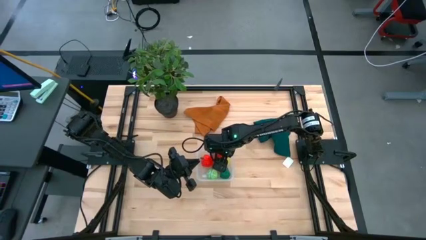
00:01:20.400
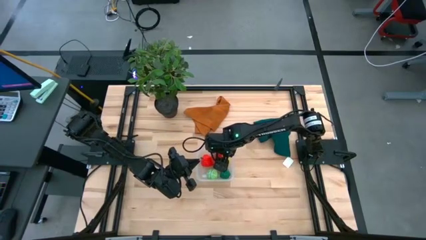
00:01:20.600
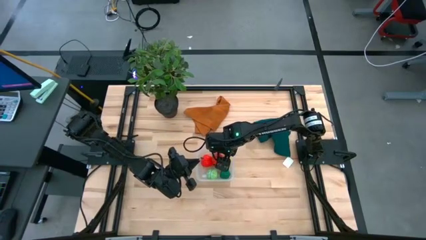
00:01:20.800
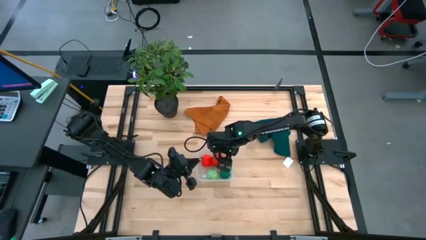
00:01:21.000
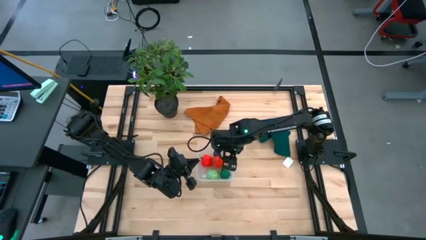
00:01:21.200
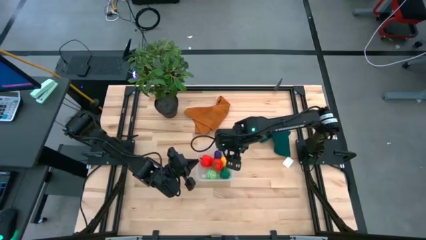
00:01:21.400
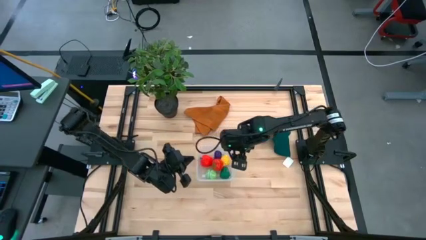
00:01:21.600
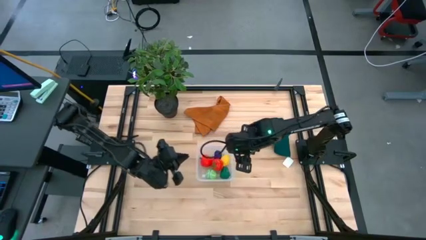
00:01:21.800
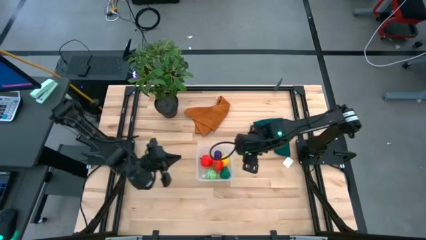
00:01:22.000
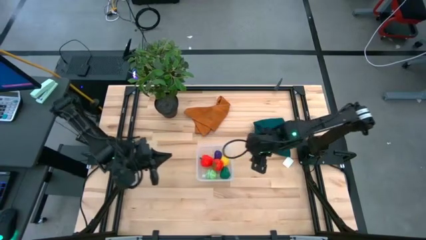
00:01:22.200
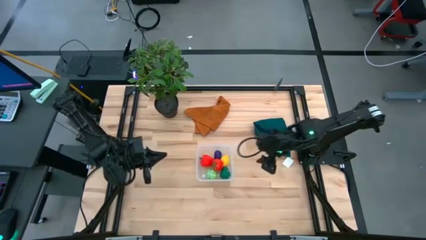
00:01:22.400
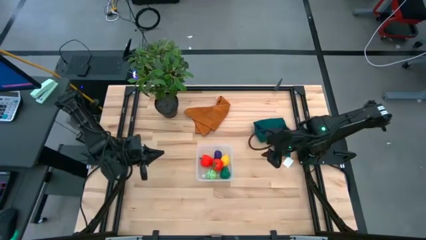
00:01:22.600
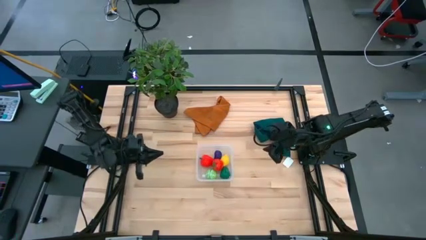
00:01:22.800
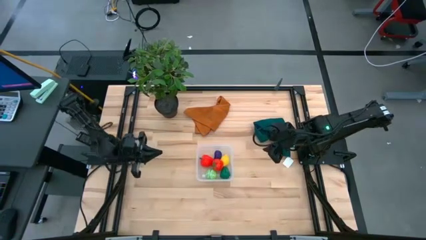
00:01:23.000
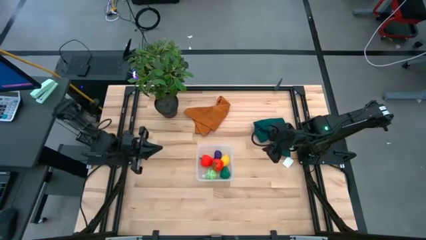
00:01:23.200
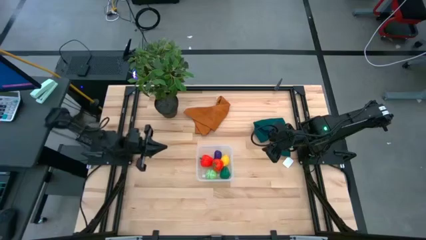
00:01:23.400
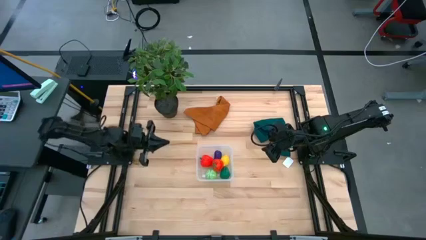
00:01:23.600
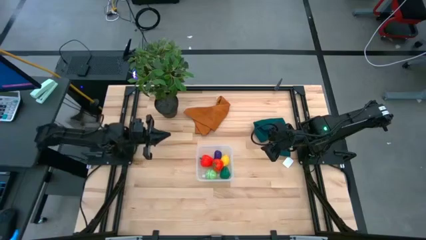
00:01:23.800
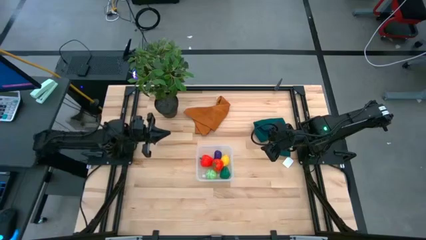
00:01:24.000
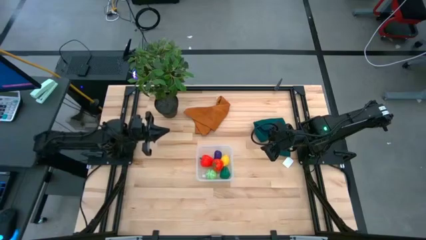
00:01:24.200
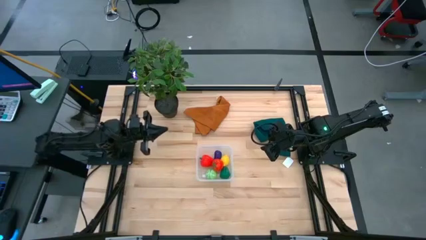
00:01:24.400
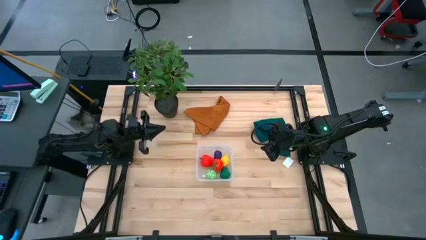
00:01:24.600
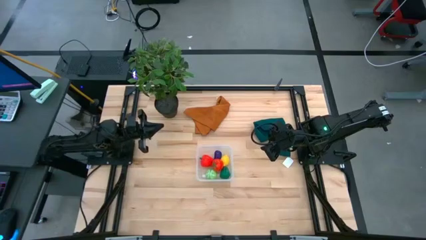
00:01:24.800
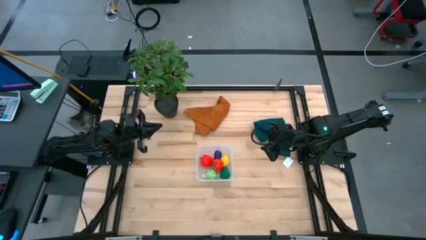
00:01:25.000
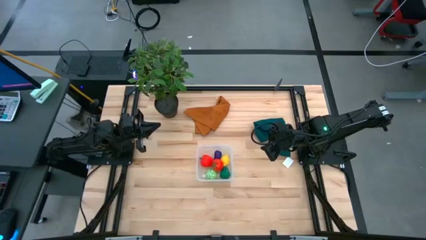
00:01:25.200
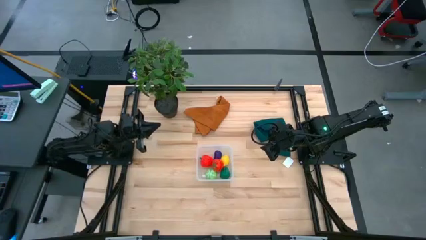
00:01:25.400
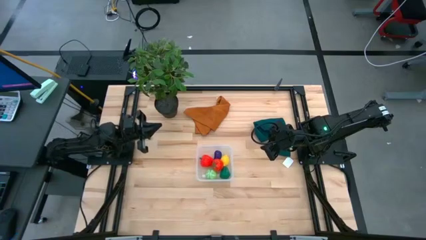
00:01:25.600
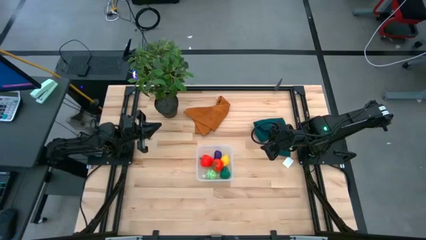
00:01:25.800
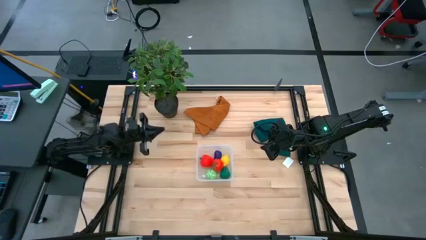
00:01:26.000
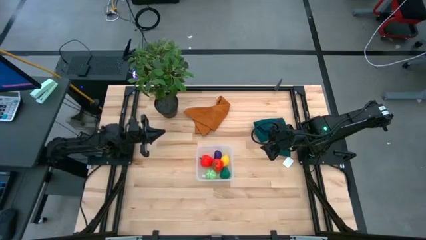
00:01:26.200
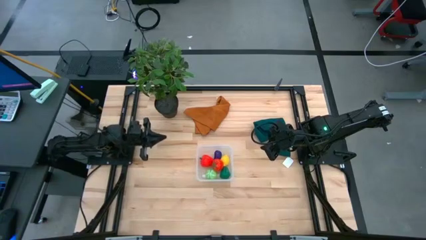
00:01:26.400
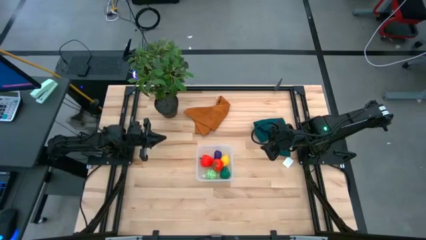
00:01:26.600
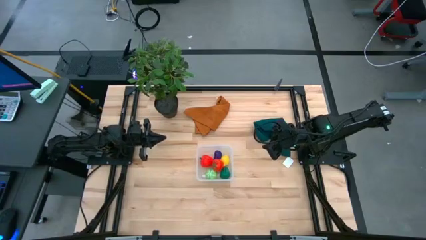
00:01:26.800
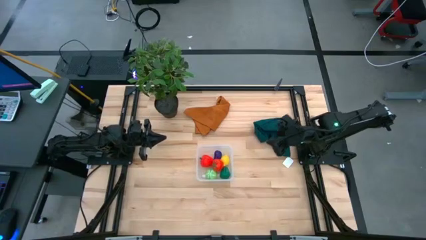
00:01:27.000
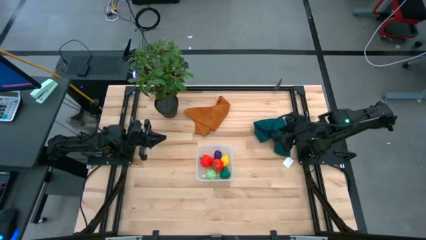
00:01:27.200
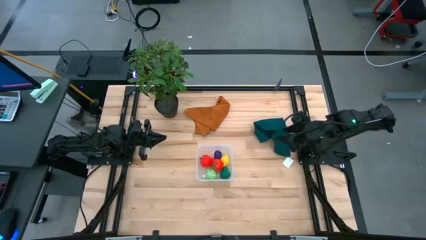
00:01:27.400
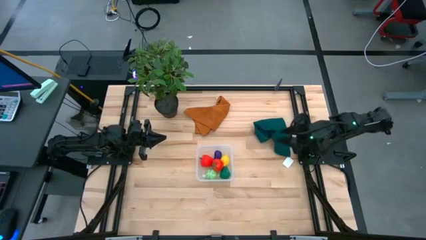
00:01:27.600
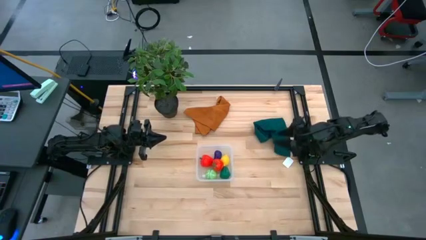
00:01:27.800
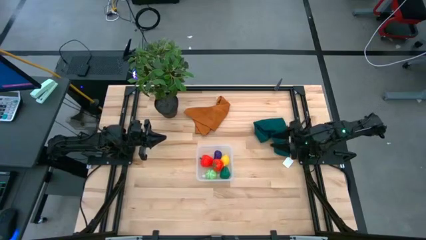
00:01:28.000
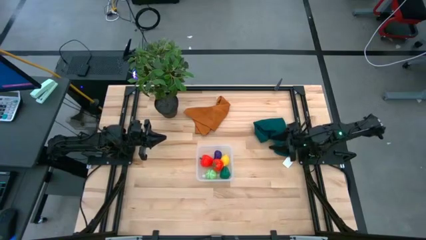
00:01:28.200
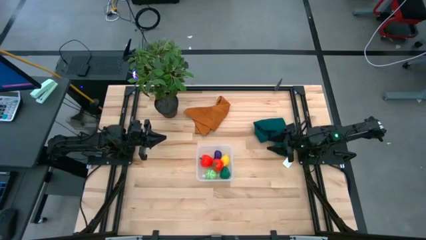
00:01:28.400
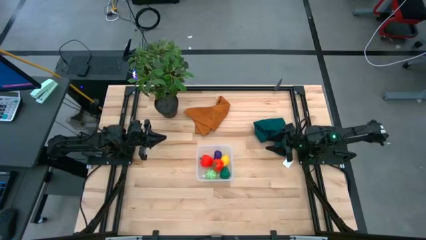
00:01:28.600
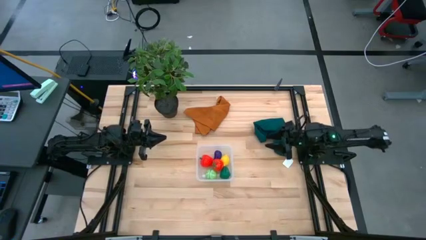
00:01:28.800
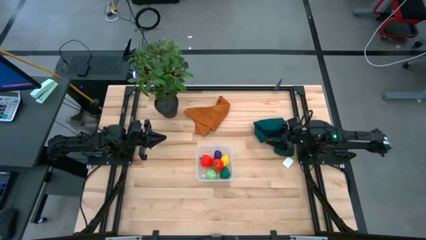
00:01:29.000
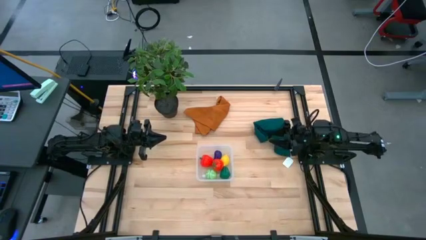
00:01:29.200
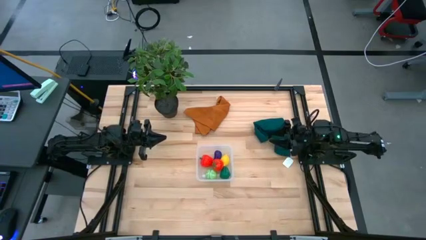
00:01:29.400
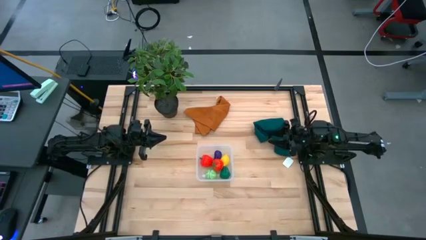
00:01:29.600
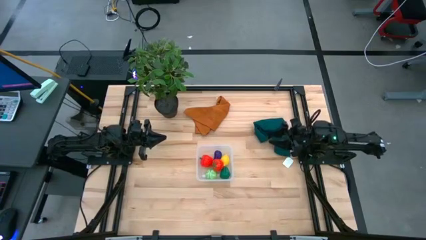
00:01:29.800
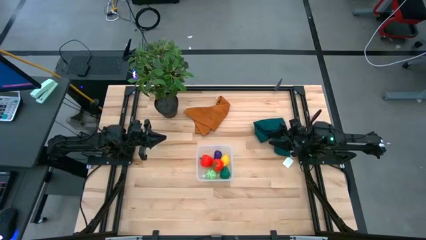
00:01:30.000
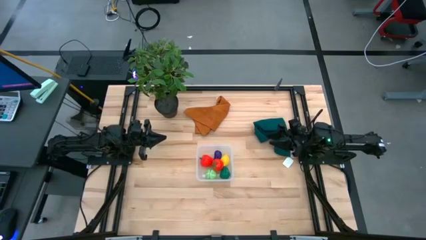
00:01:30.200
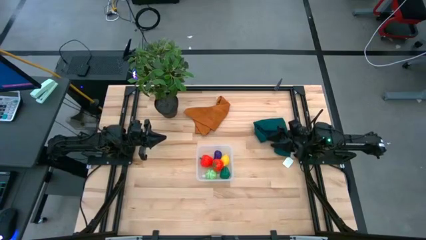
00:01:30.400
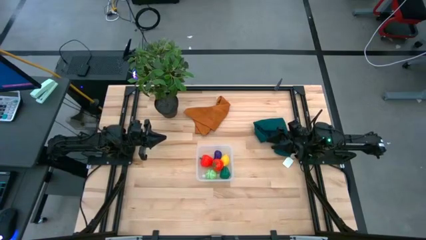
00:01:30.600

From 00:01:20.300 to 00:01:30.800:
Task: Pick and placing Produce into tupperware
Return to Home Position

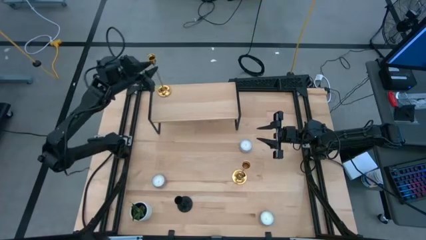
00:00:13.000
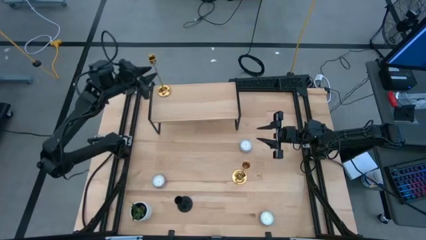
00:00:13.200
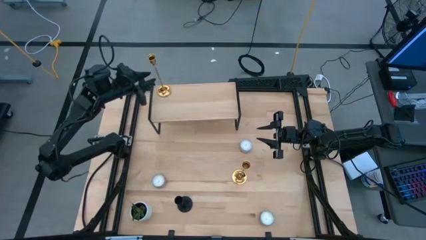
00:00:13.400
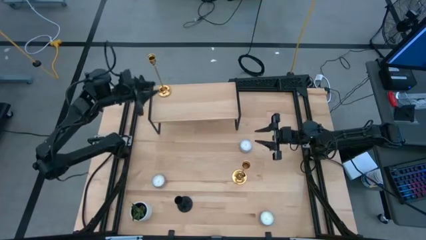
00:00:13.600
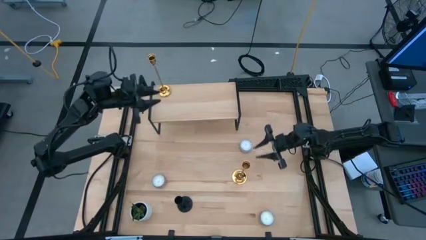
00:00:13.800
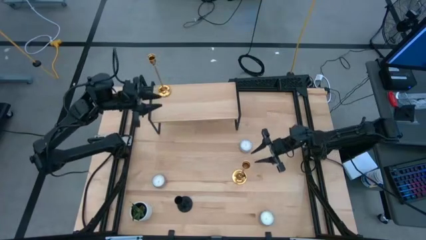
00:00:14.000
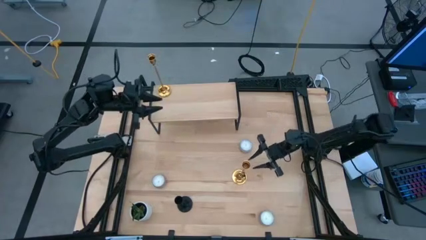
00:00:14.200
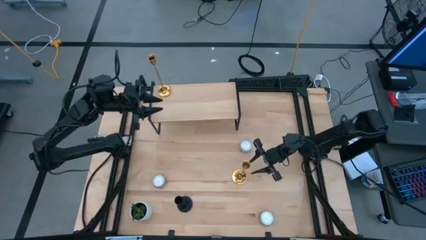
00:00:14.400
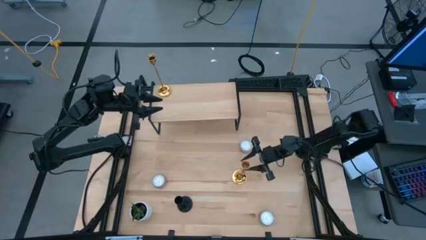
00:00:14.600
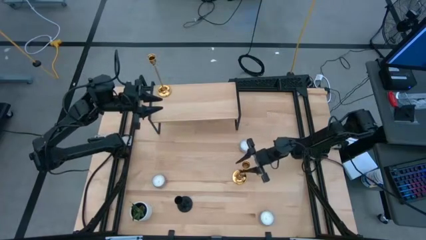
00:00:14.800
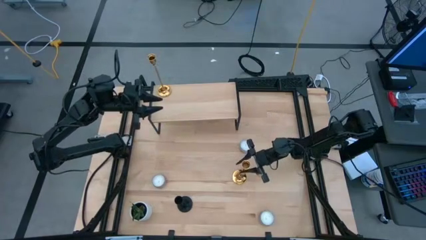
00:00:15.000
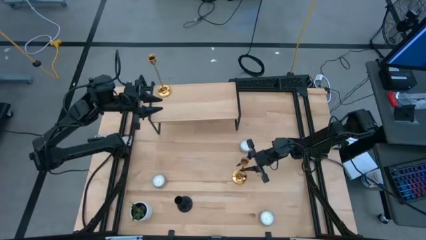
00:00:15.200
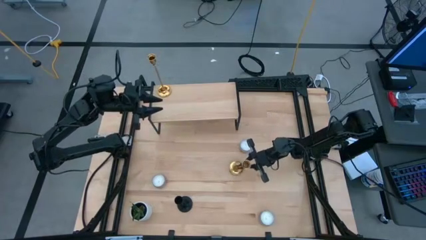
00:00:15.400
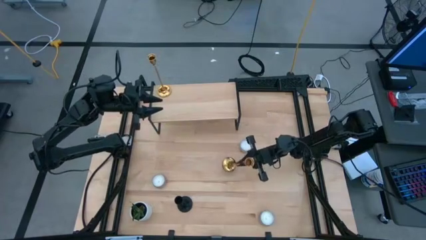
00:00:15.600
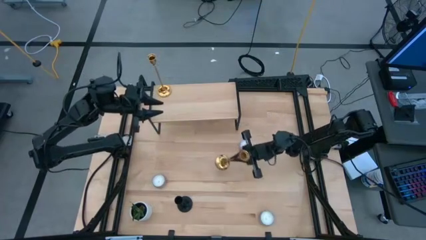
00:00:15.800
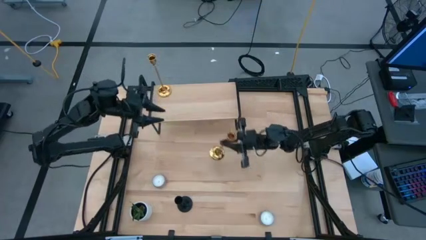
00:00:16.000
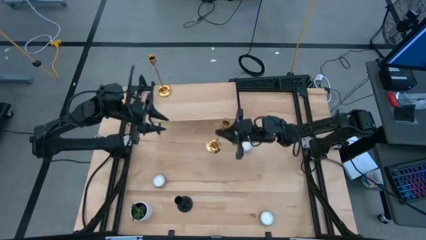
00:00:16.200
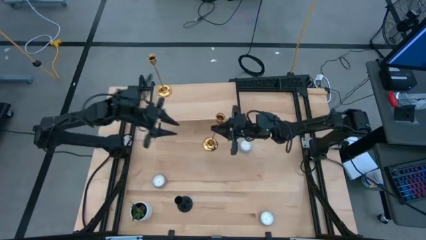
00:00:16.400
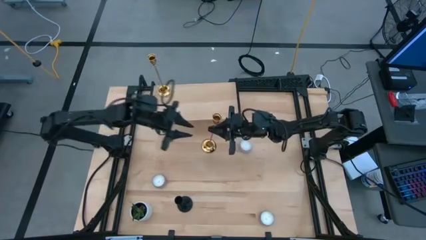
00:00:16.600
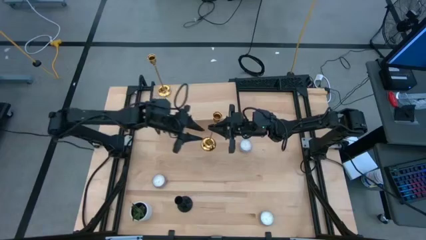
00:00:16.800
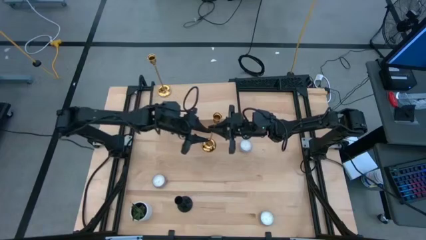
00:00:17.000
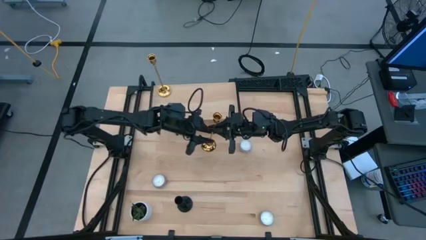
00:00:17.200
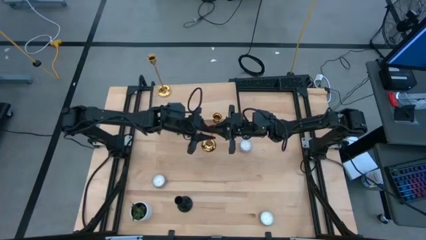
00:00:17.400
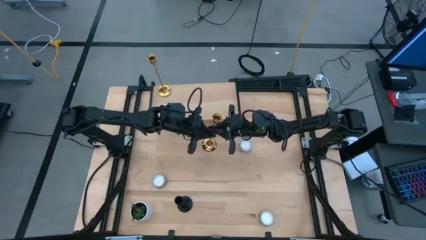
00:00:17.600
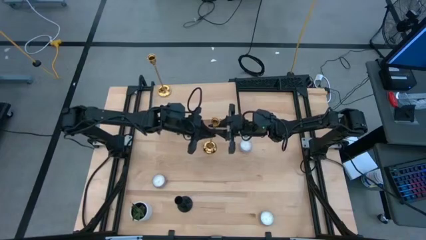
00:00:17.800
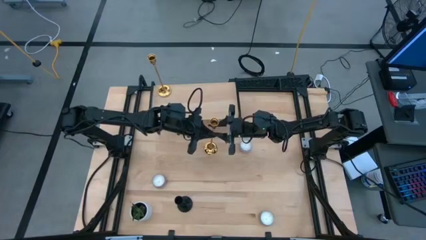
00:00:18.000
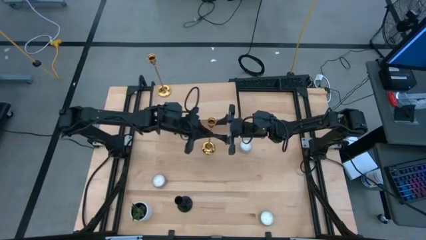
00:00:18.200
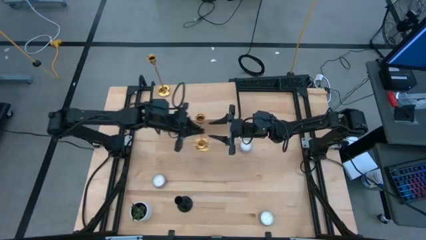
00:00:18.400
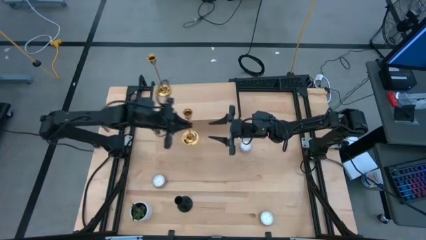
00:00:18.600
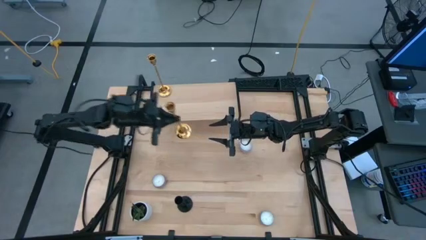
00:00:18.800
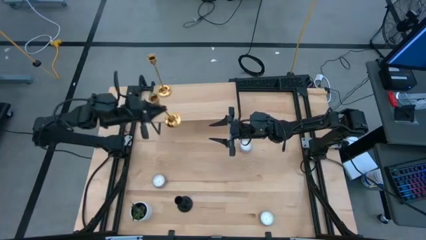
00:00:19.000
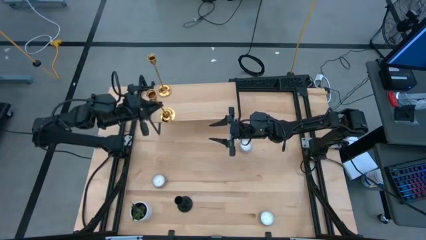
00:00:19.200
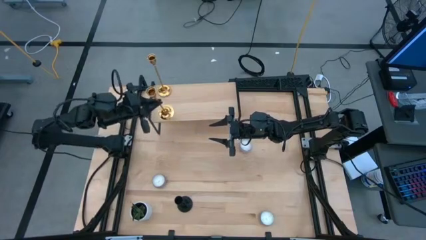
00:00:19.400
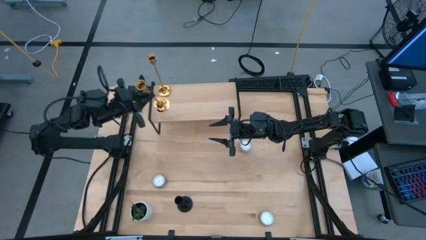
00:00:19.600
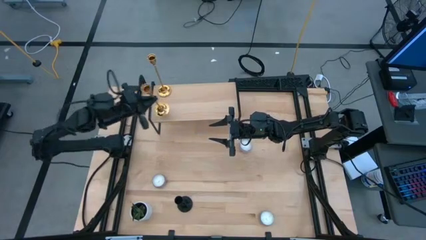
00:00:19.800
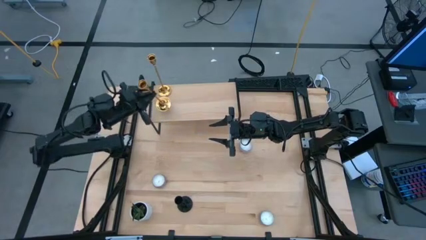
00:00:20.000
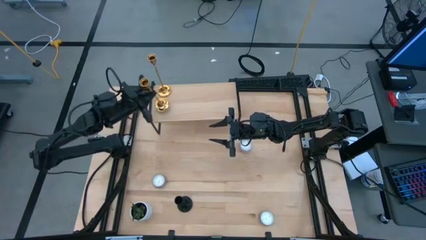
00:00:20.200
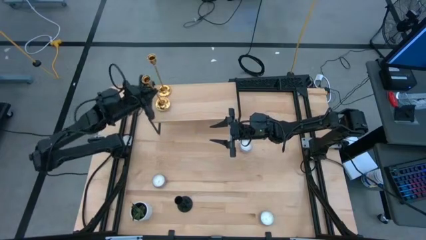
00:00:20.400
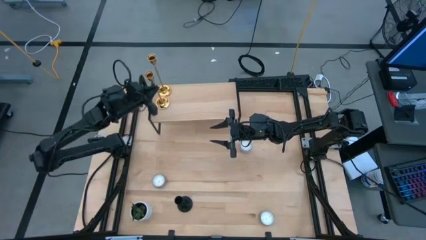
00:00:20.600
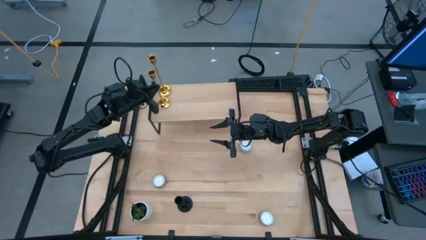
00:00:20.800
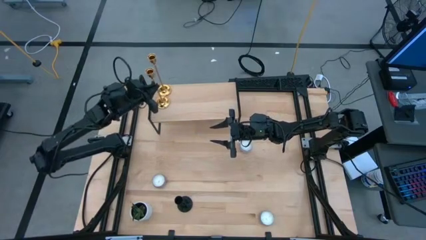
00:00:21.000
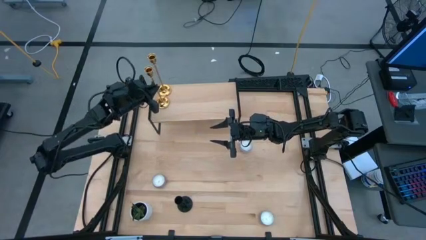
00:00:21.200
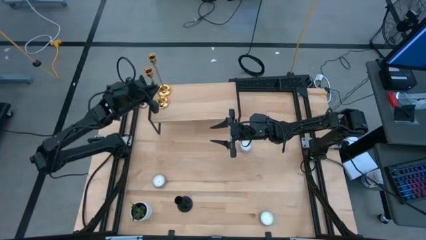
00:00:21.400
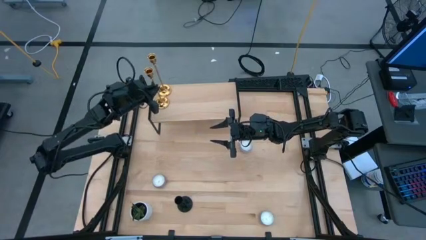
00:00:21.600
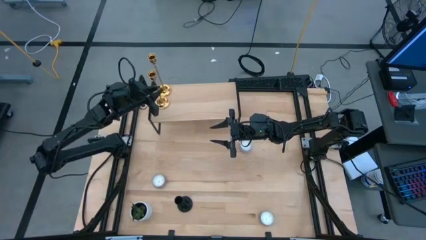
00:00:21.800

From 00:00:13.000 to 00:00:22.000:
Task: Pick & Place candle stick holders
Put the gold candle holder on the shelf
